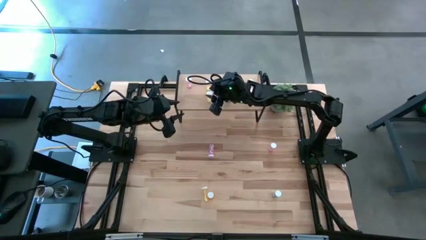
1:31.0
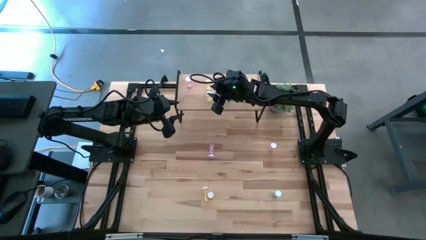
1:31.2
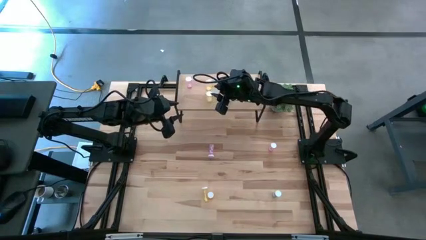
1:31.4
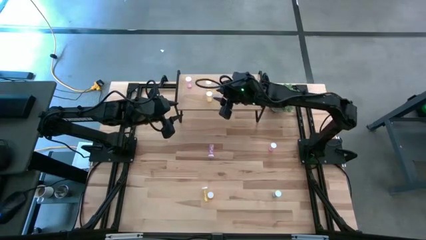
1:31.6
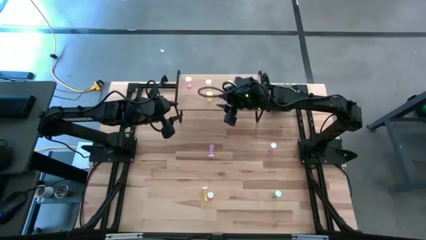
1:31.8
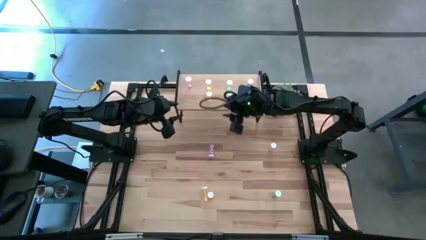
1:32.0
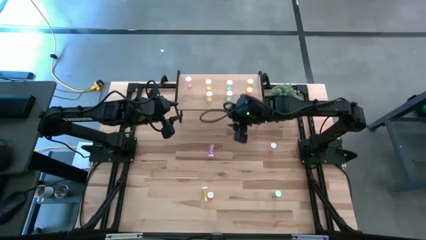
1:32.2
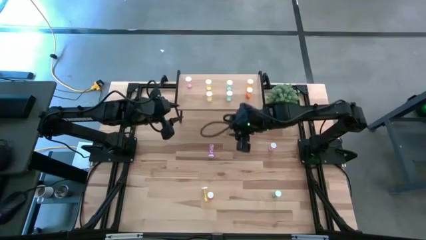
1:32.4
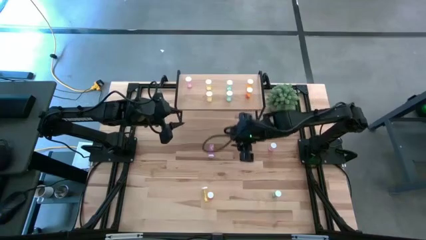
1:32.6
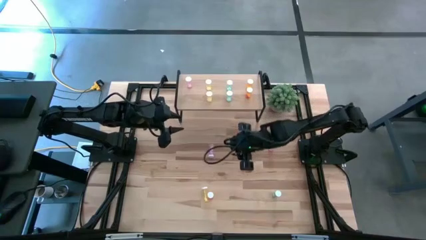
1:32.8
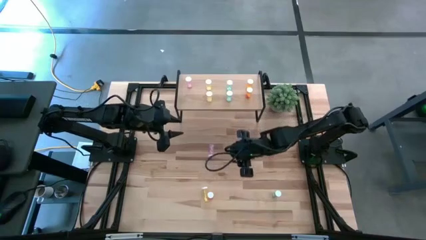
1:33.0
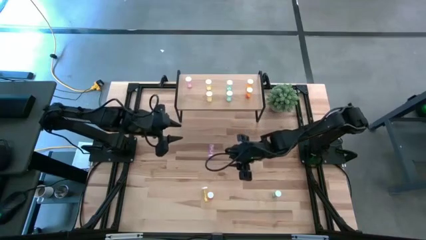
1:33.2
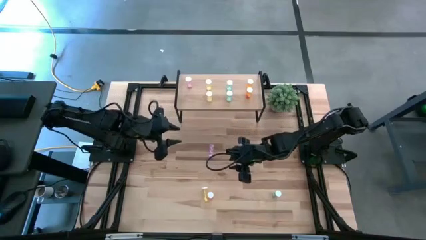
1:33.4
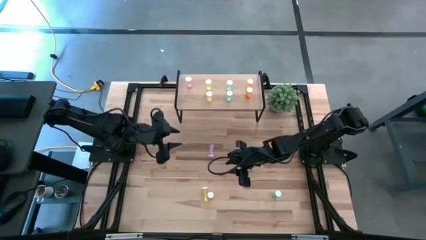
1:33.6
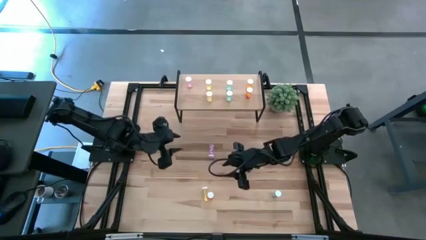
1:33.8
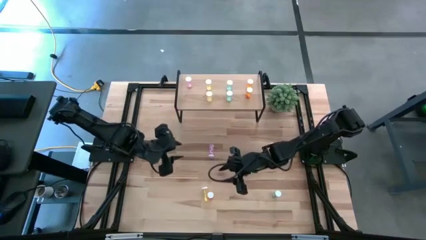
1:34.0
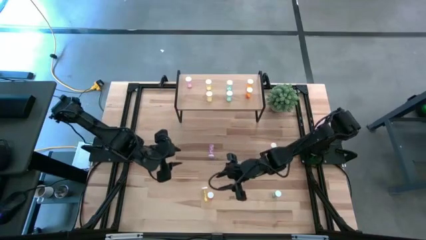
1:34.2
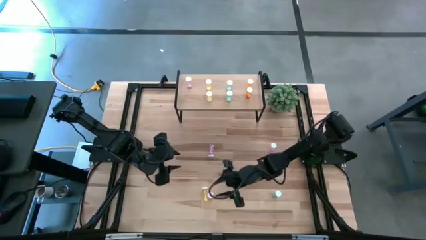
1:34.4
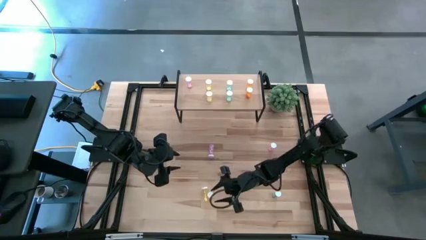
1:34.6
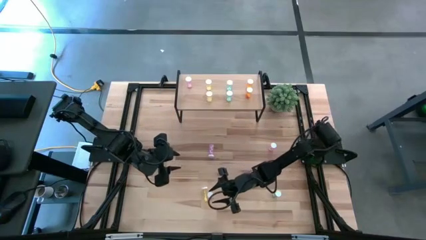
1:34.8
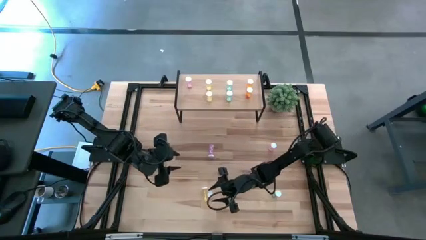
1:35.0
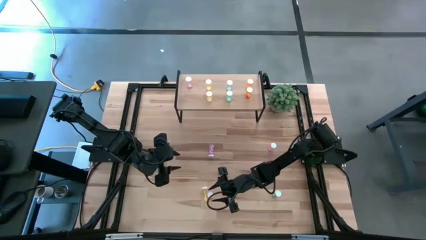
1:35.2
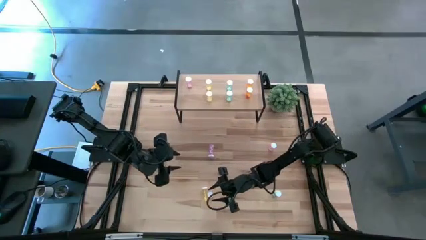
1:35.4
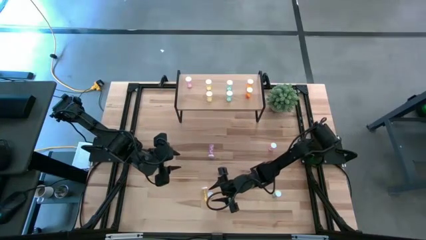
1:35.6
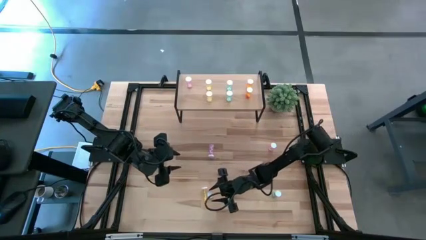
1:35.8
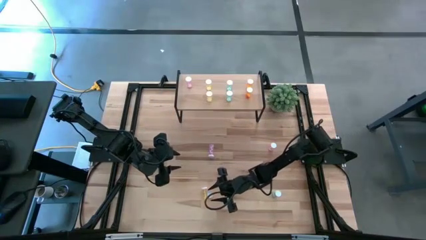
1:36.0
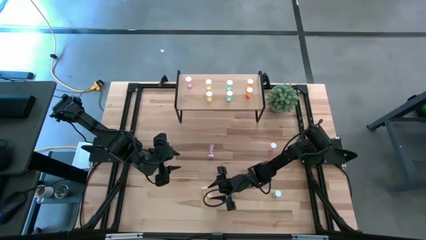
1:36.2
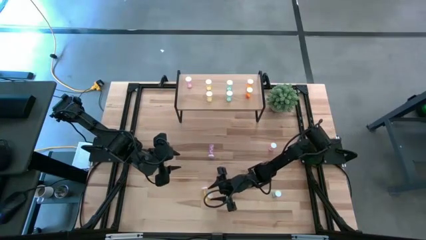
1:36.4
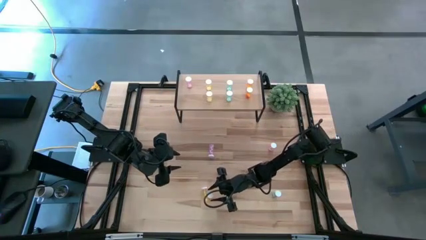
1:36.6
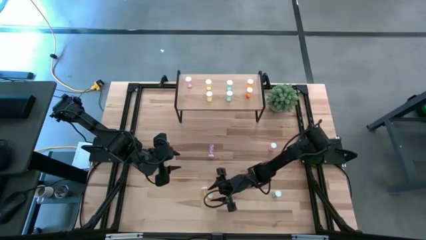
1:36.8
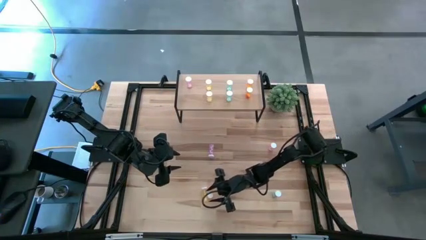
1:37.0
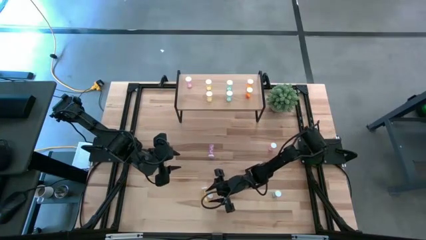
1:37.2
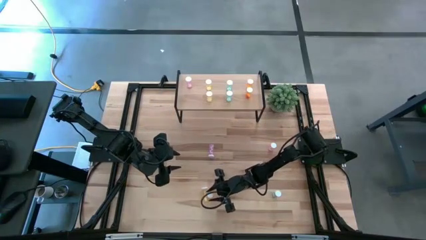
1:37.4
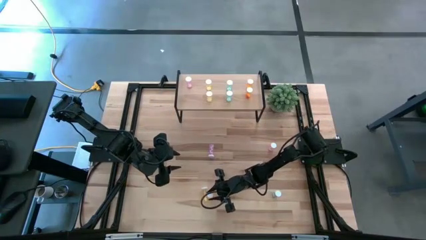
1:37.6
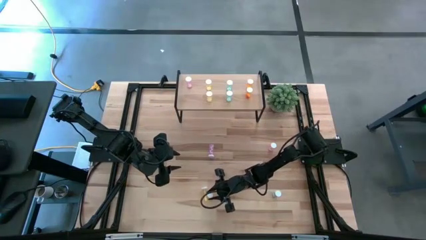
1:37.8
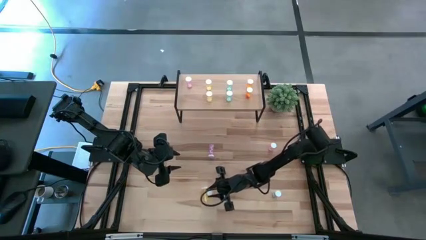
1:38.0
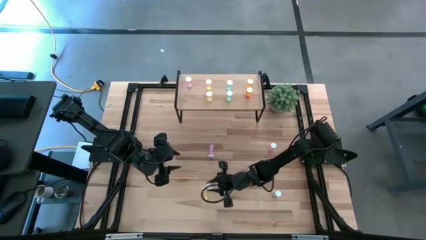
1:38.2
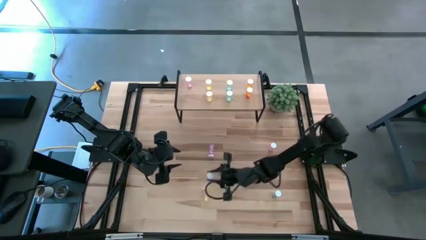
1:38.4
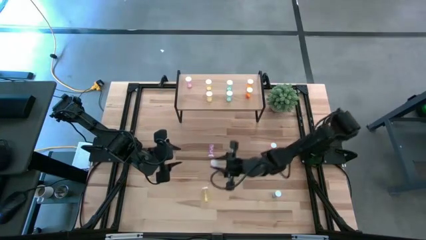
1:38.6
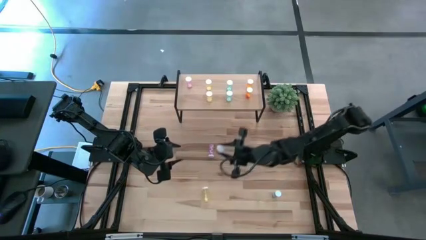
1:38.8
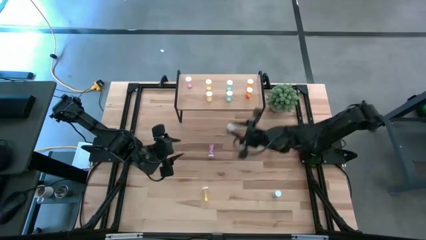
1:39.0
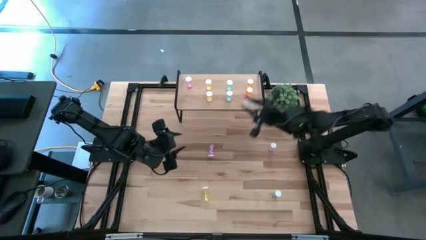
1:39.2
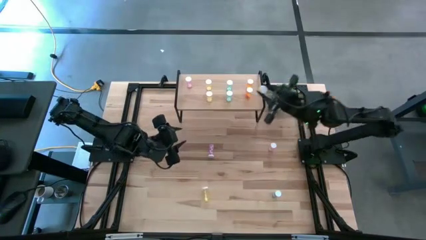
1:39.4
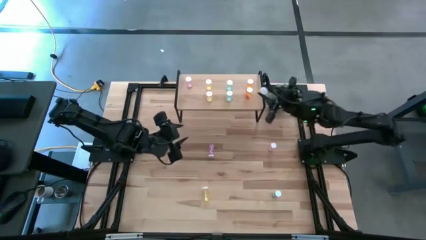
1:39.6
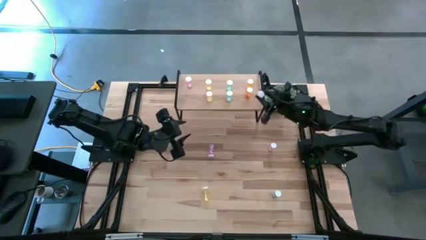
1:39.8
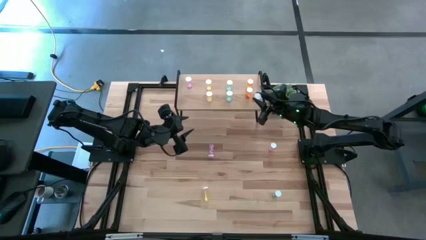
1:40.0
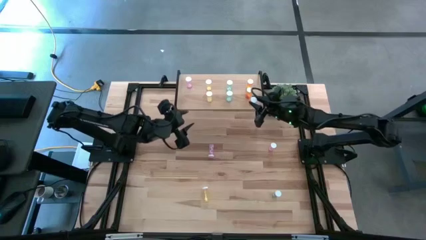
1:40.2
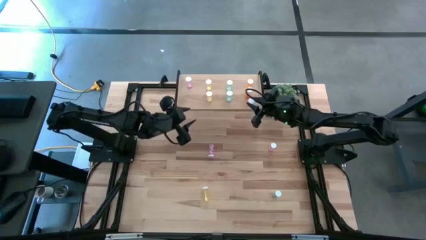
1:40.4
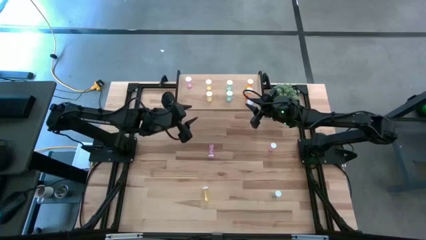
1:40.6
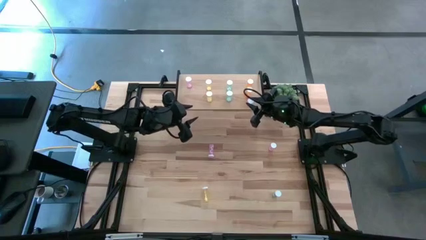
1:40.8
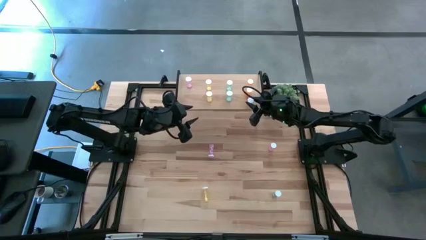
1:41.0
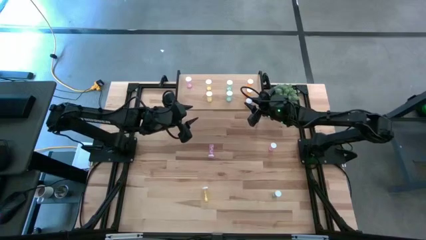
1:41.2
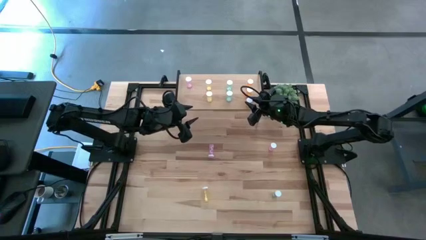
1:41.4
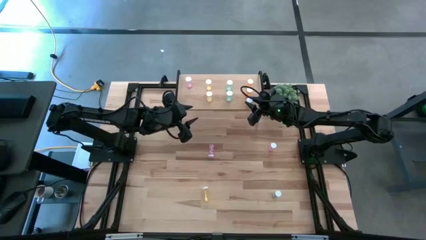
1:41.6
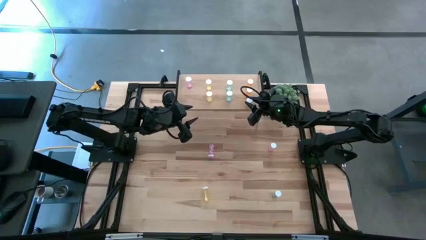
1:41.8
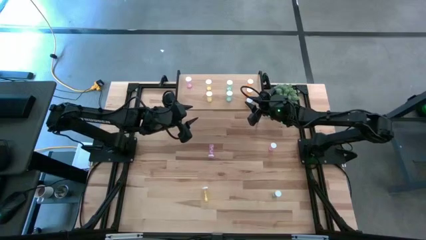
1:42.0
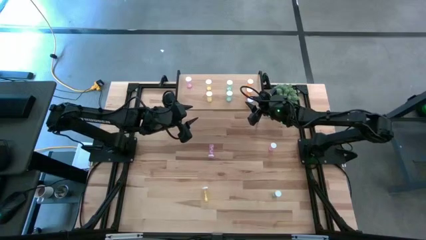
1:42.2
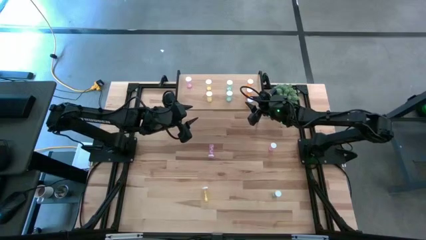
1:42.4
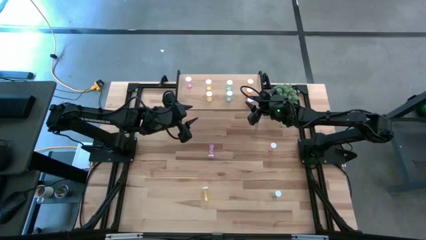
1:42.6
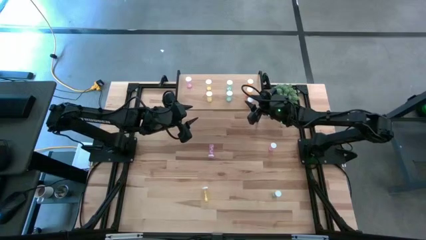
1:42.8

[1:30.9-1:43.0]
Task: Pick and place medicine bottles onto shelf by color
Put the orange pill bottle aligned with the other orange pill bottles on the shelf

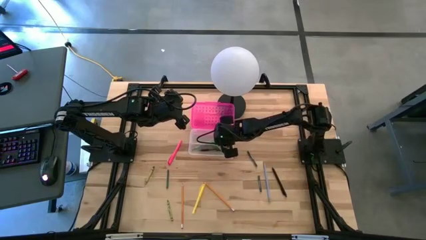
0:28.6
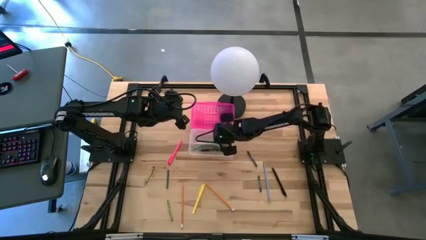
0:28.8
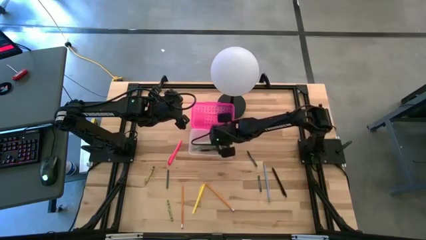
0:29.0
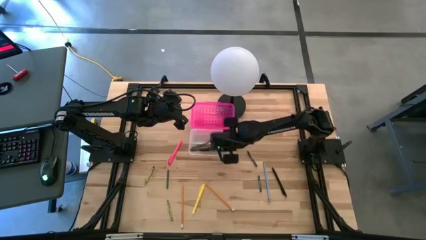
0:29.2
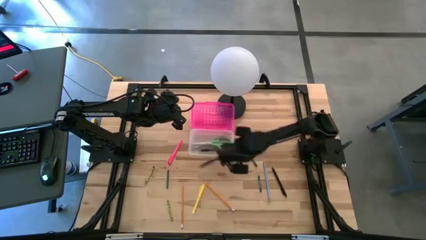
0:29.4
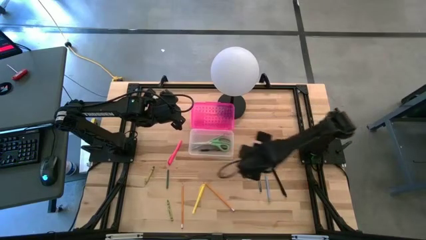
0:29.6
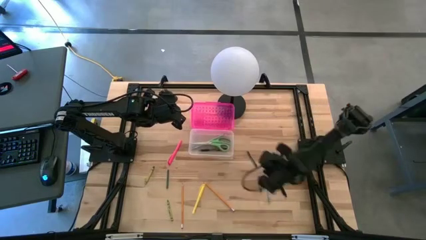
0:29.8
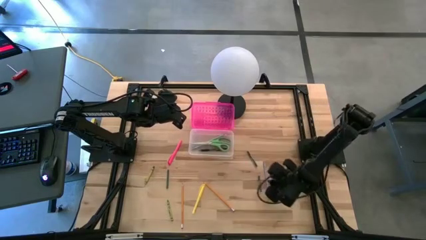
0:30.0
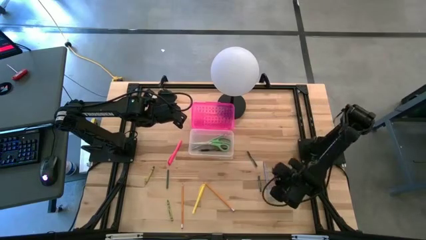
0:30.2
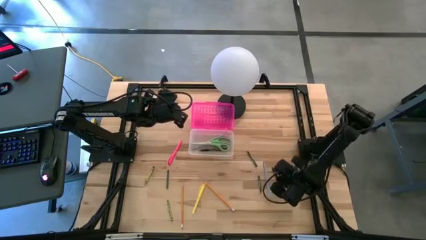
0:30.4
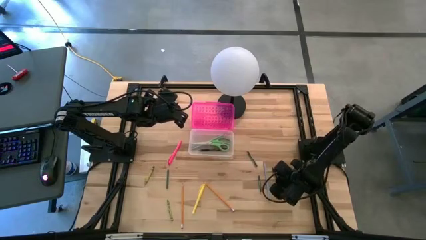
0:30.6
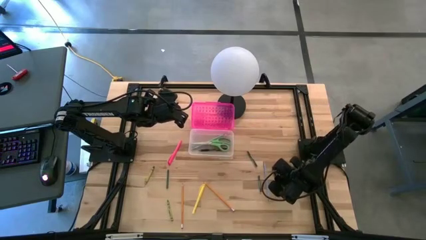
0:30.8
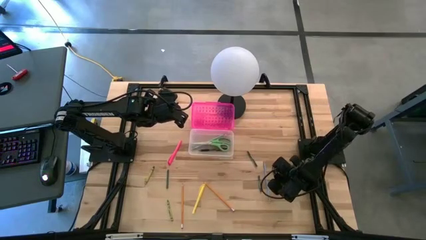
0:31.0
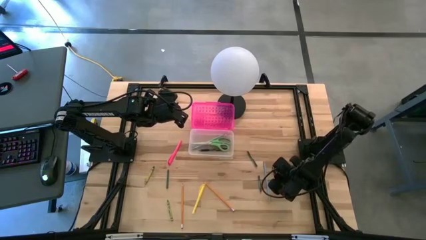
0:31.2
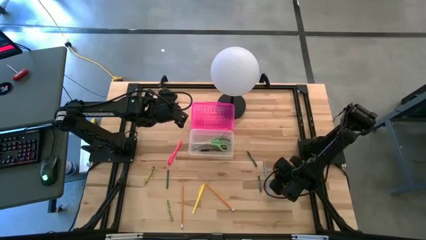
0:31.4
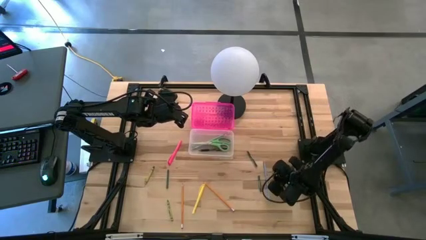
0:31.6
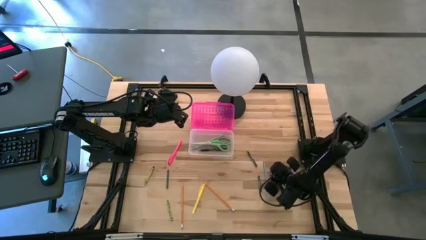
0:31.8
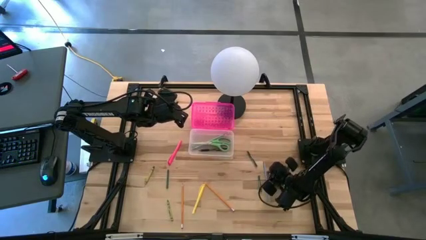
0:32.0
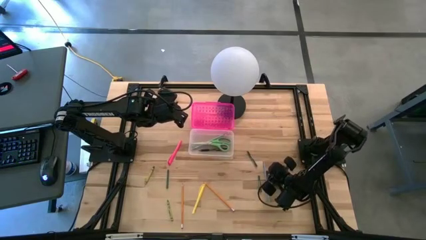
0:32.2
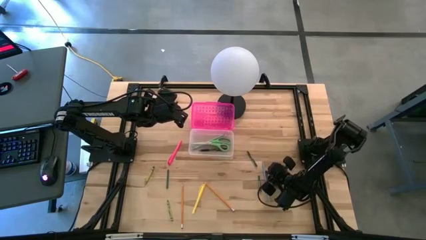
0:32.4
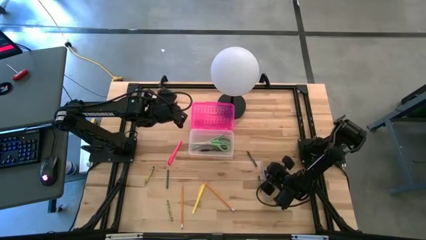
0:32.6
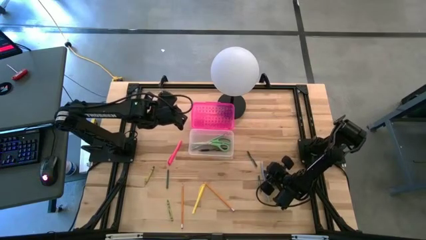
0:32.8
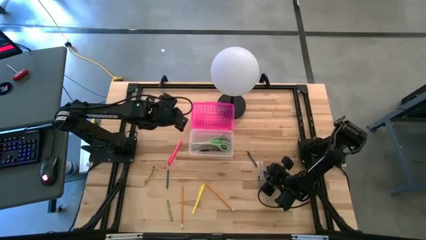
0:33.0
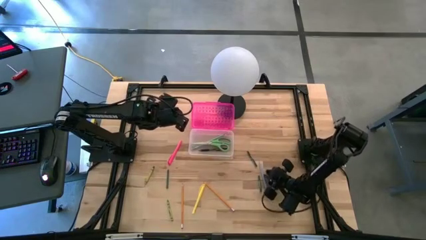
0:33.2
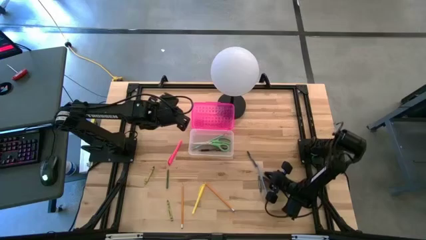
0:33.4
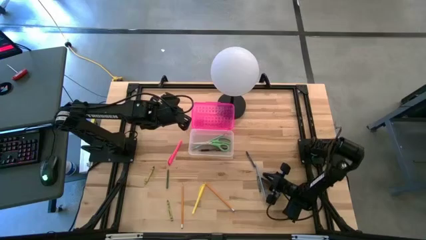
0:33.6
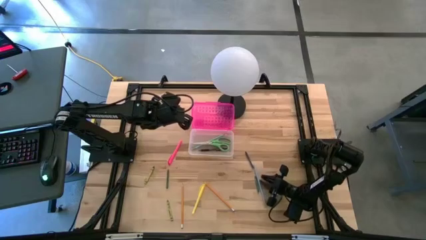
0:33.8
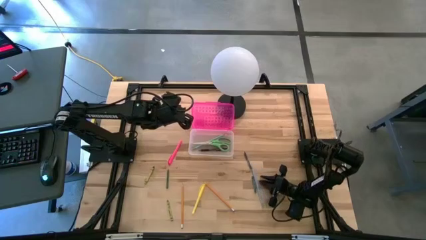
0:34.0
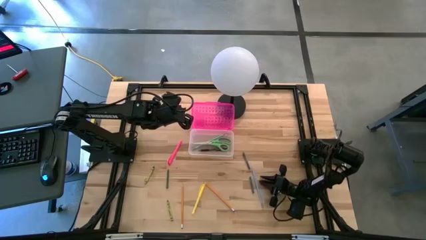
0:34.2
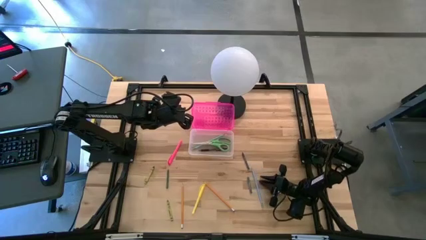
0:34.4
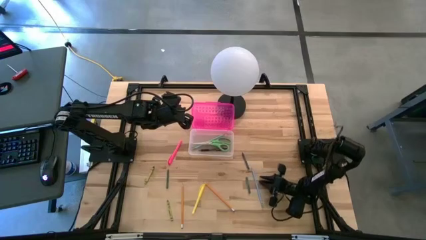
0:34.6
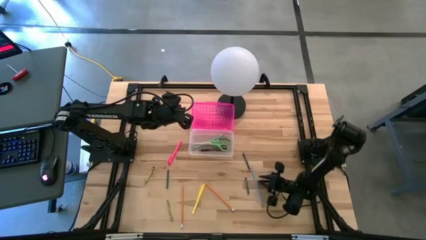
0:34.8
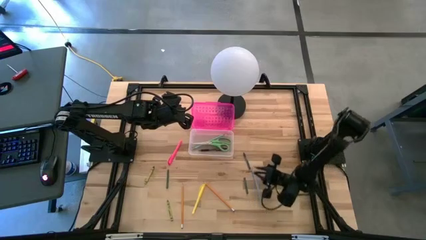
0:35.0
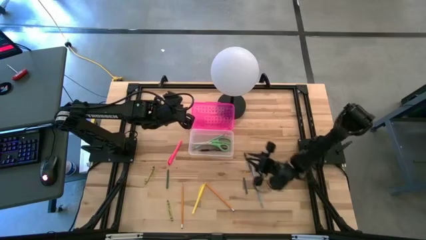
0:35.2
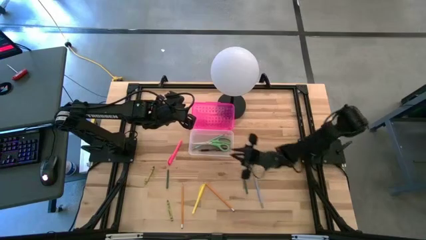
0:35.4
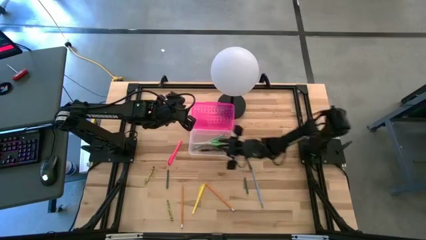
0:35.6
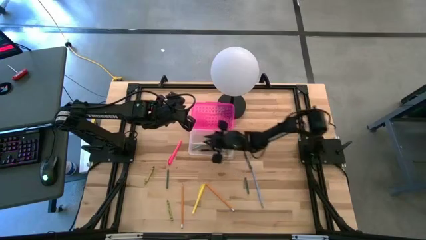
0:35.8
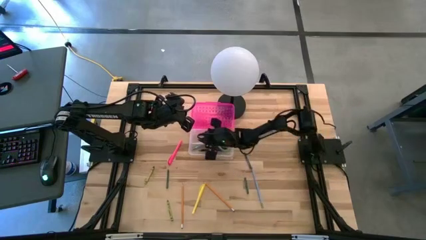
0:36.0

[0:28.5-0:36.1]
Task: Pick & place school supplies into a supply box
Put the black pen into the pink supply box
